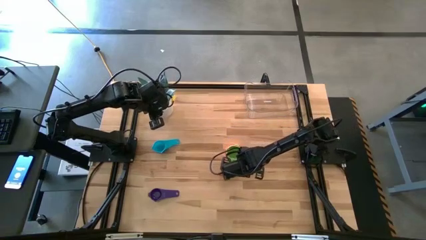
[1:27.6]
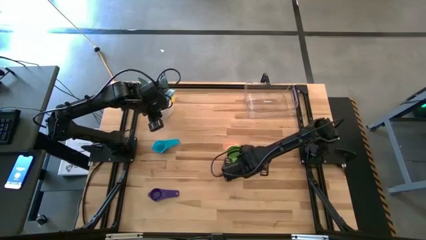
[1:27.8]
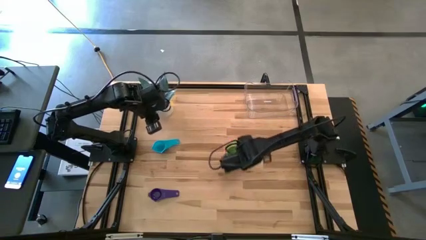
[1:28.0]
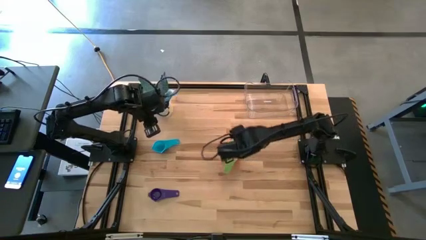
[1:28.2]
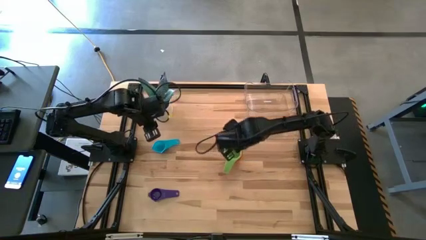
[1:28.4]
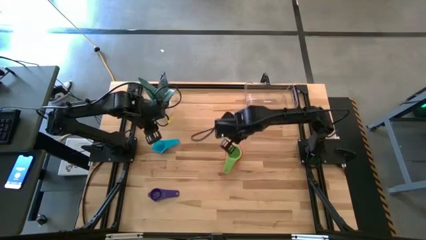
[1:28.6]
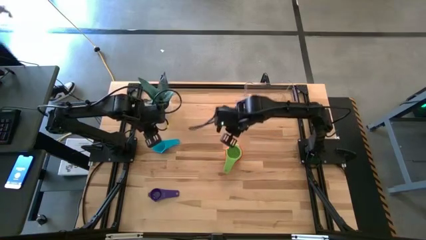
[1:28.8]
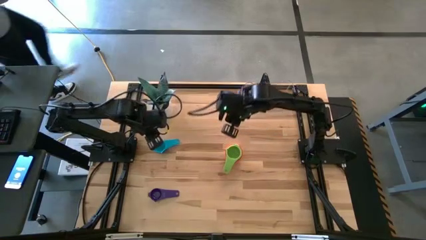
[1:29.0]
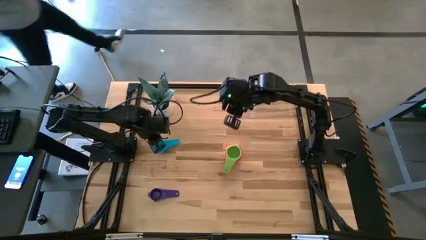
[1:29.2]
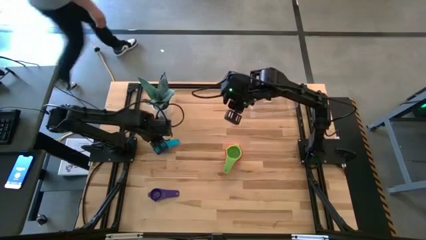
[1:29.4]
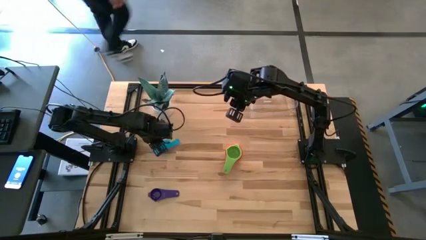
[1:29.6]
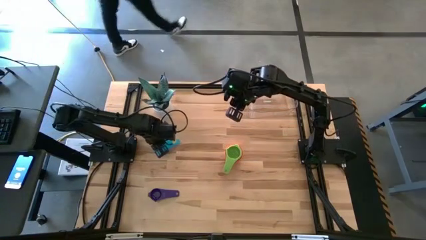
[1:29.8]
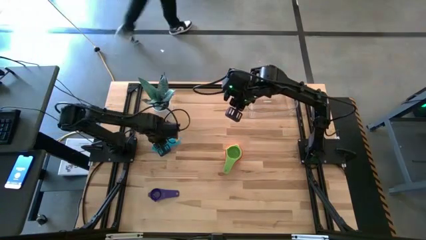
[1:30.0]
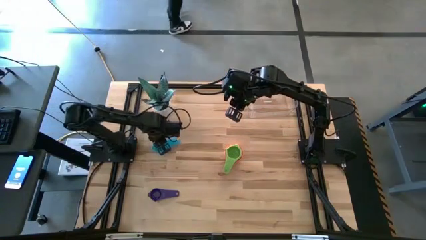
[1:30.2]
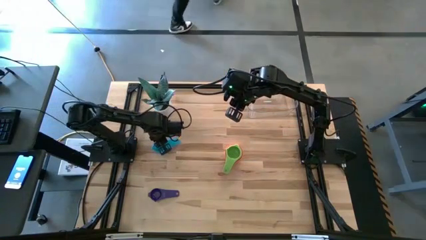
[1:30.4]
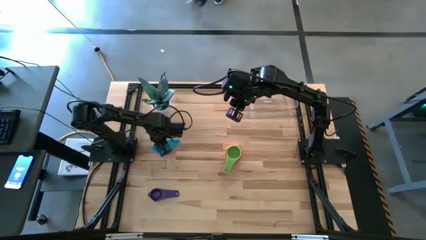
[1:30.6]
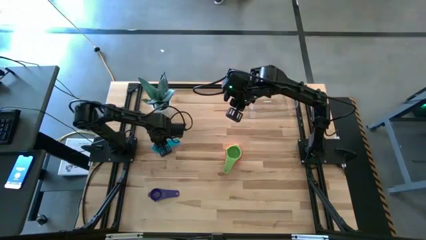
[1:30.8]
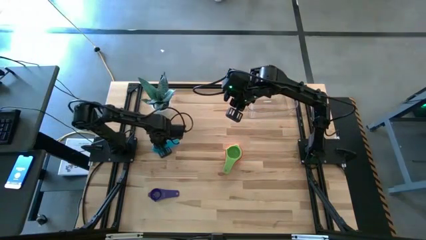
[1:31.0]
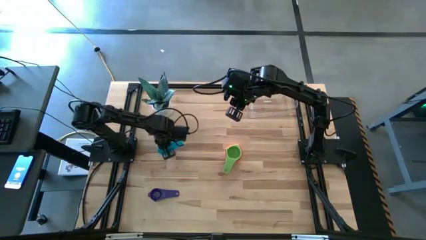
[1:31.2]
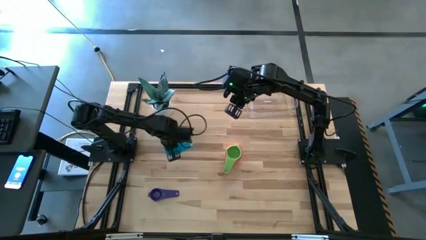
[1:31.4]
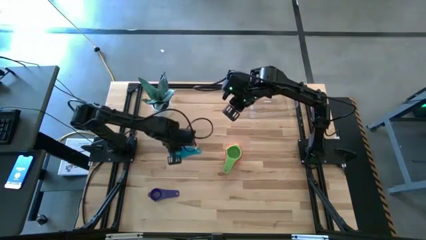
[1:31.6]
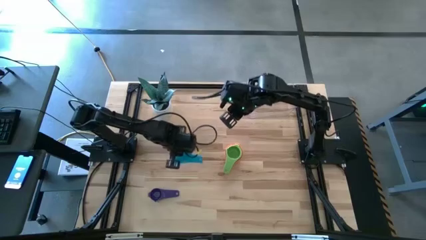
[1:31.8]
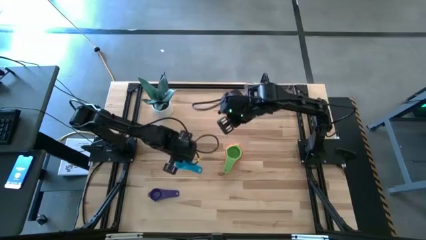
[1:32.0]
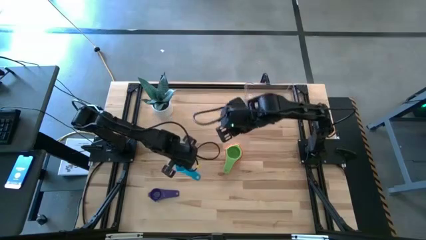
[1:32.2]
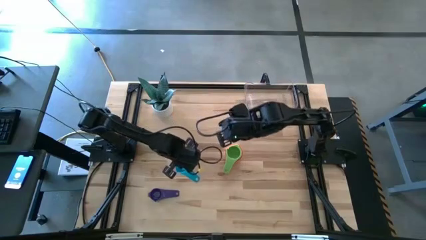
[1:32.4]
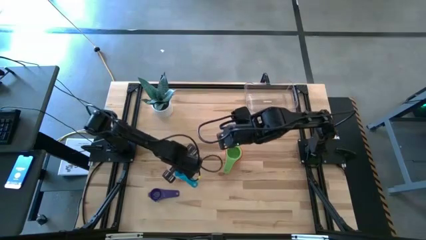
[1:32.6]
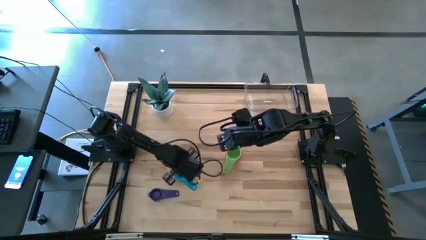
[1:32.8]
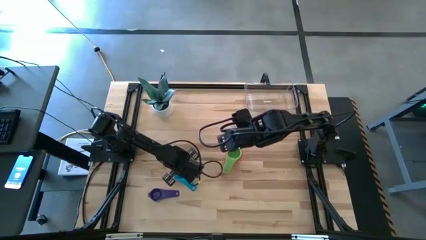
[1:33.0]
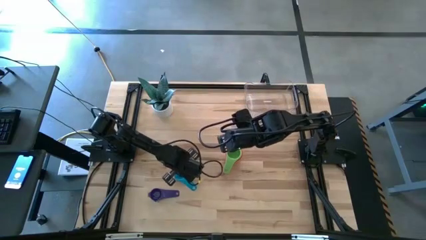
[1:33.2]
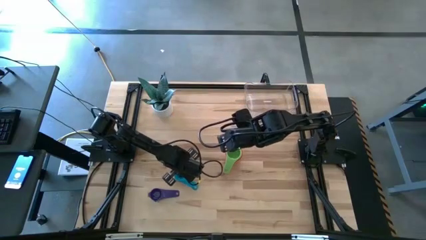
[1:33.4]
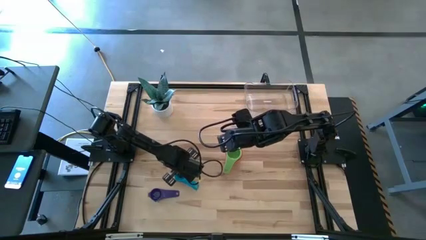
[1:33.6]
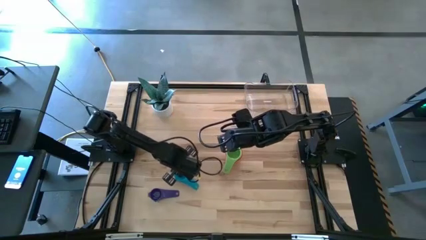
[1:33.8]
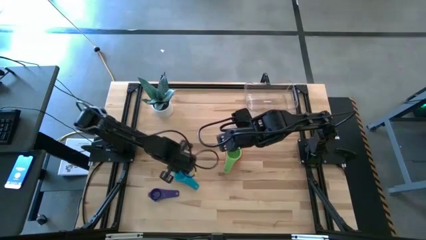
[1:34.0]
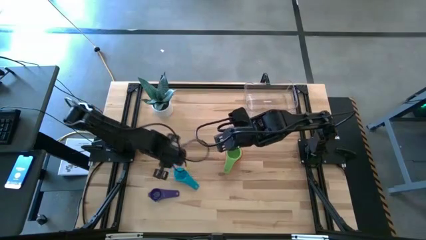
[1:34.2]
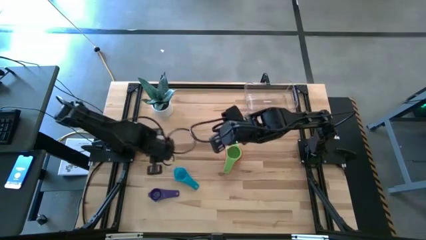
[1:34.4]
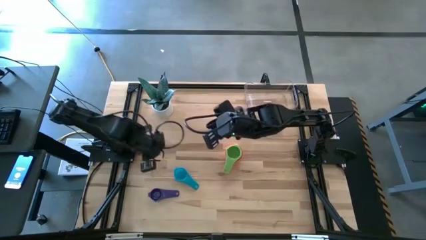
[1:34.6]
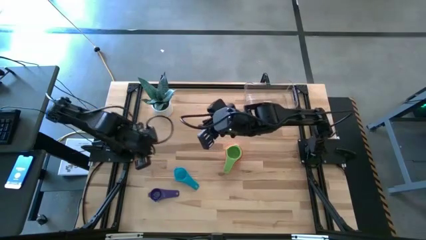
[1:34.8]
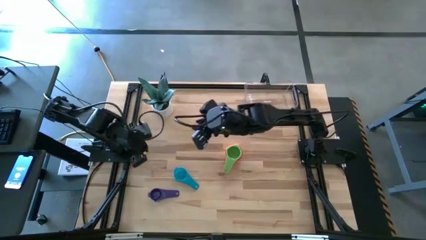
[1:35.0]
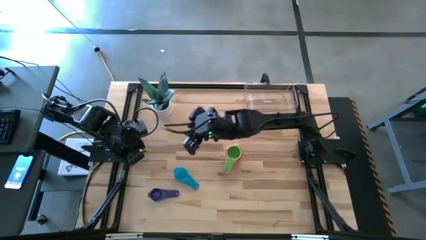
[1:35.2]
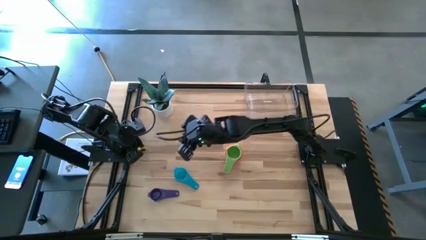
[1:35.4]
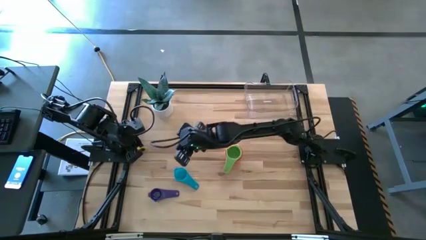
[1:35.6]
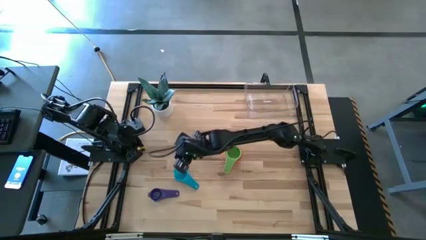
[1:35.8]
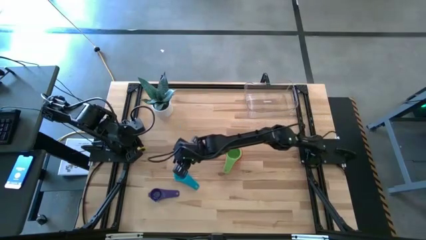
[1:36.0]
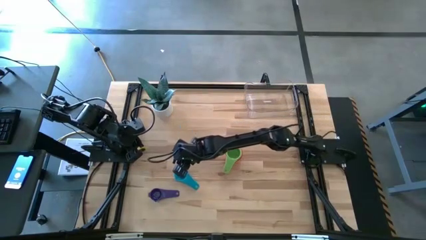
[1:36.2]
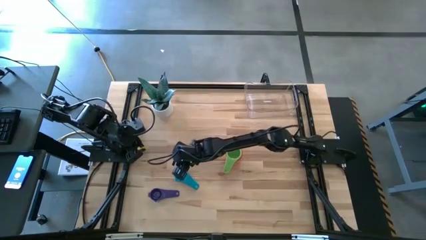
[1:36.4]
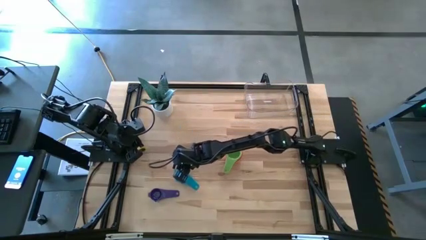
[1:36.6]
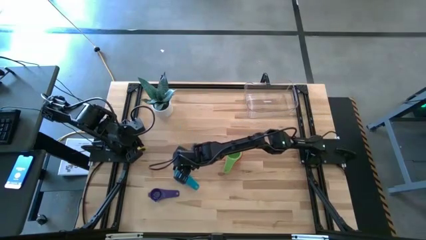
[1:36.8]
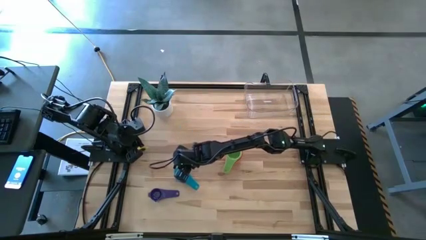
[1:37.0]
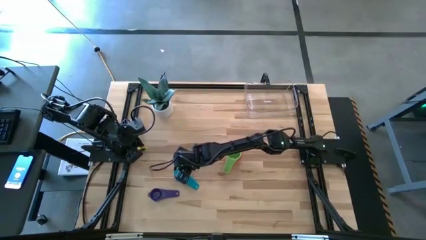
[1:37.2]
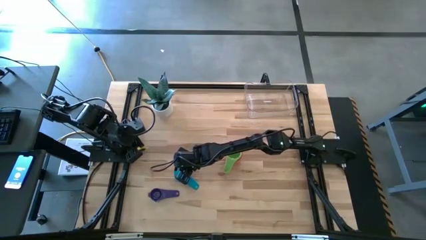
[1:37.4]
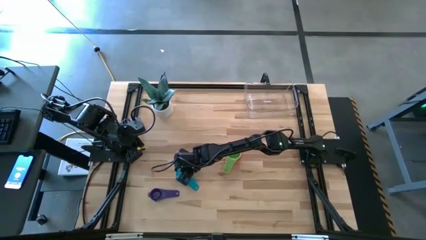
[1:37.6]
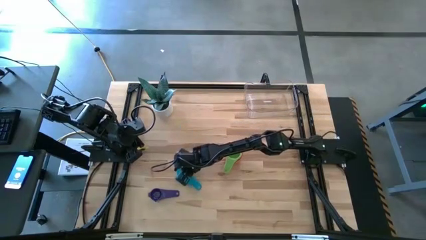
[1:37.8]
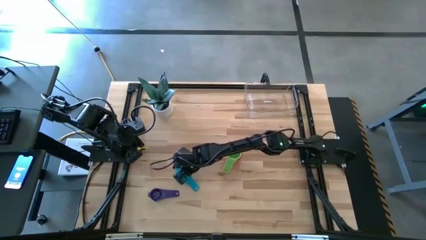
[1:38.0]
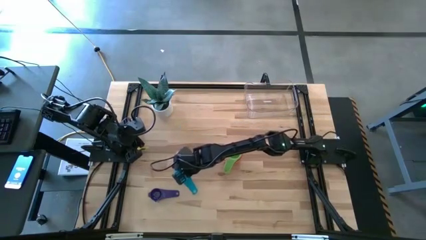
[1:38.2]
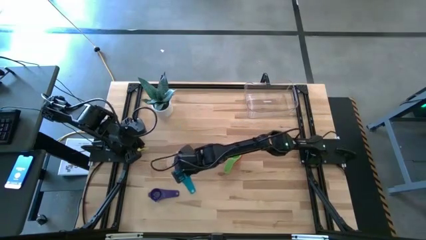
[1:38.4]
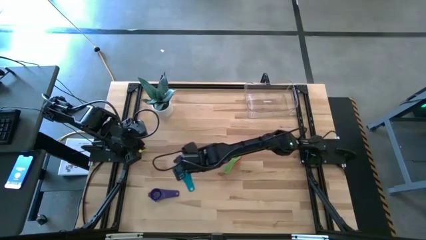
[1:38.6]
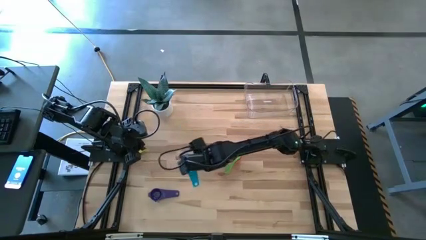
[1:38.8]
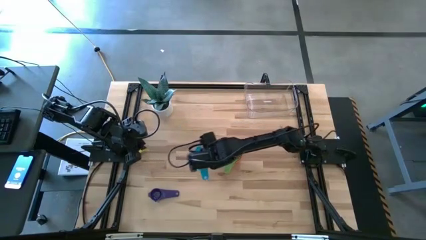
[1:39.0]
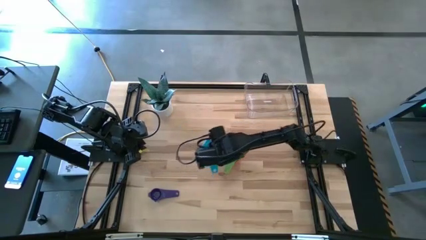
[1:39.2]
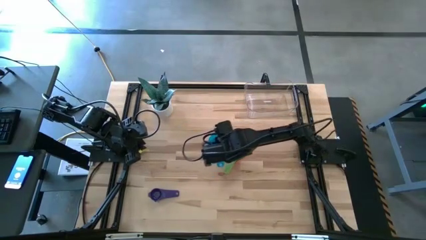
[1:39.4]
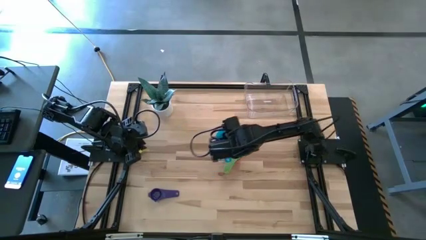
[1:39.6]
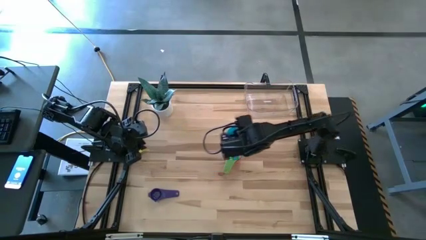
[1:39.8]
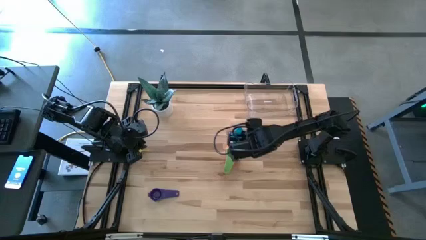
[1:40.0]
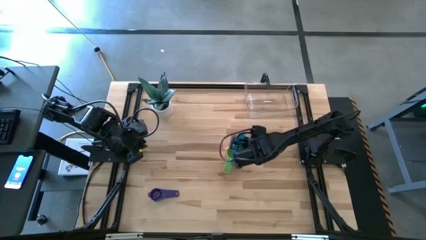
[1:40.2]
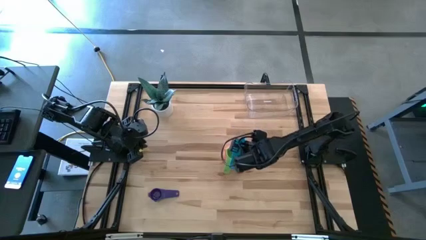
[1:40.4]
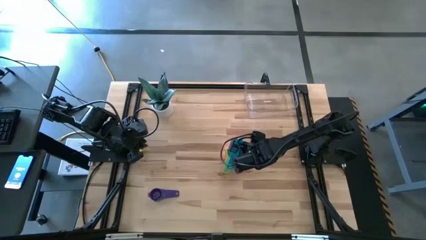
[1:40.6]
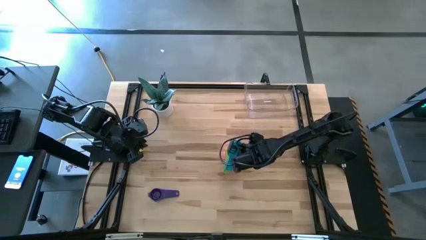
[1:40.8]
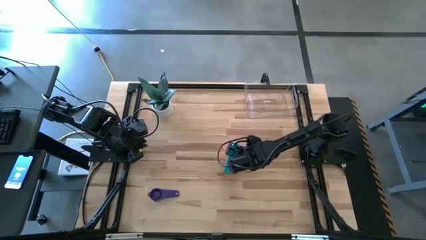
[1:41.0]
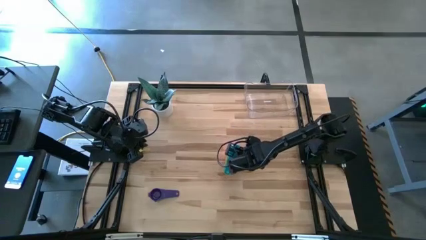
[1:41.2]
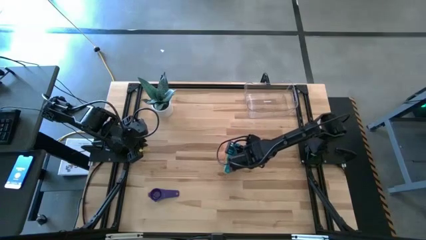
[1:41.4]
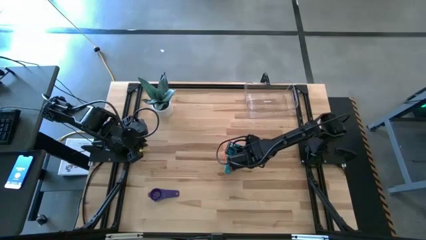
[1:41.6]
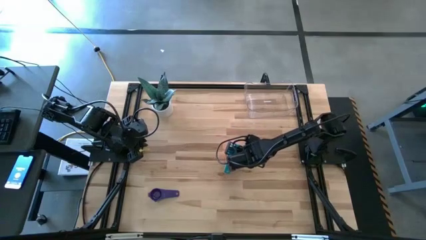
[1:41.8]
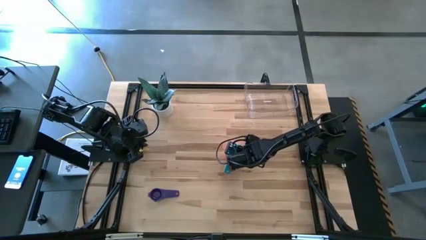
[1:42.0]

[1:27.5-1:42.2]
Task: Nest measuring cups in basket
Stack the light blue measuring cup on top of the green measuring cup

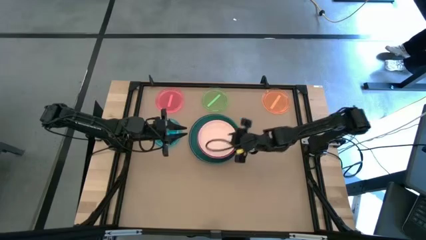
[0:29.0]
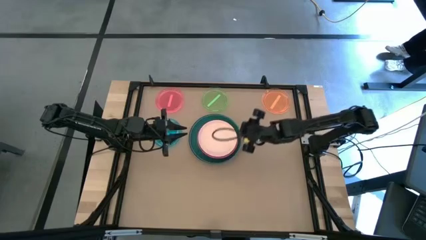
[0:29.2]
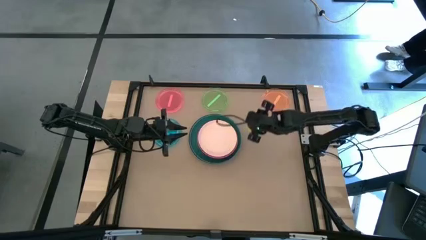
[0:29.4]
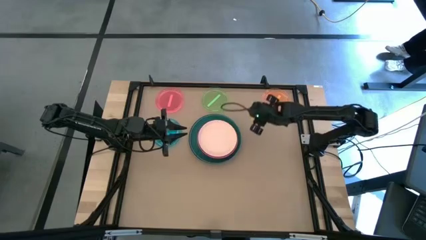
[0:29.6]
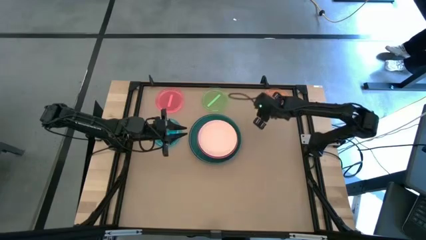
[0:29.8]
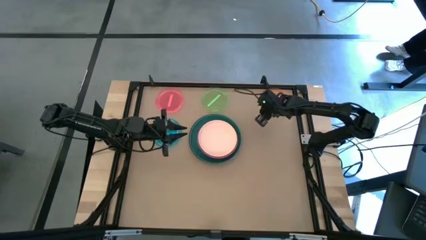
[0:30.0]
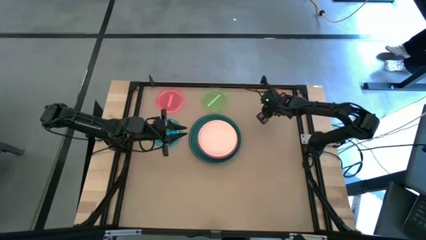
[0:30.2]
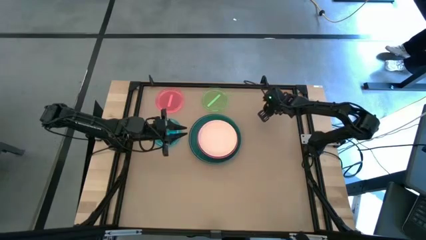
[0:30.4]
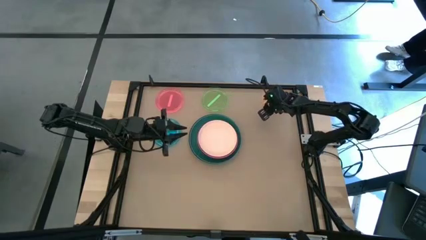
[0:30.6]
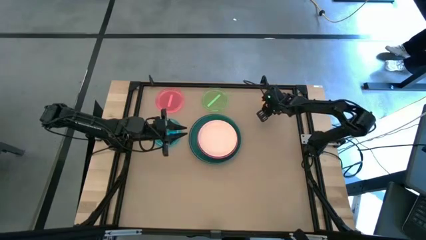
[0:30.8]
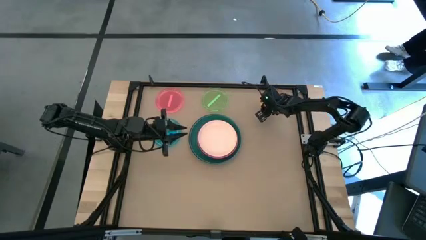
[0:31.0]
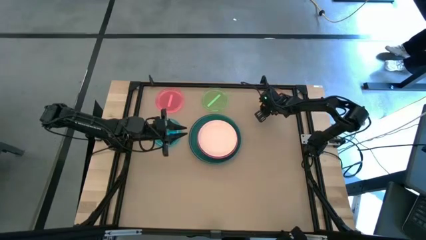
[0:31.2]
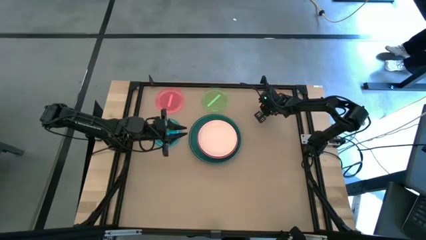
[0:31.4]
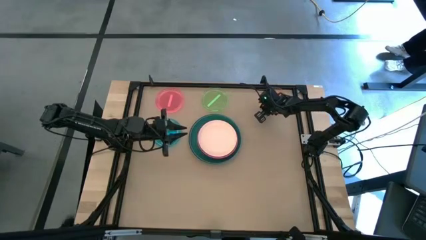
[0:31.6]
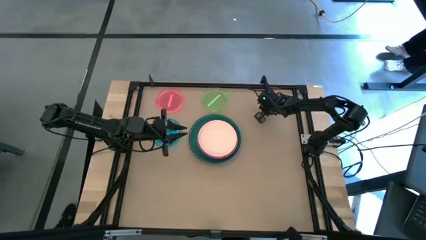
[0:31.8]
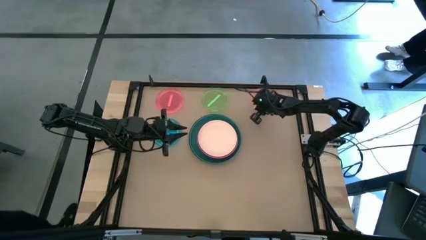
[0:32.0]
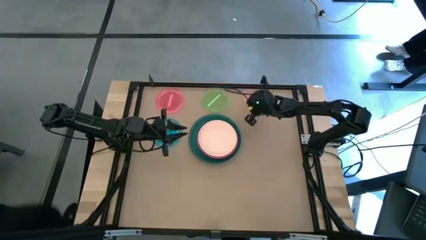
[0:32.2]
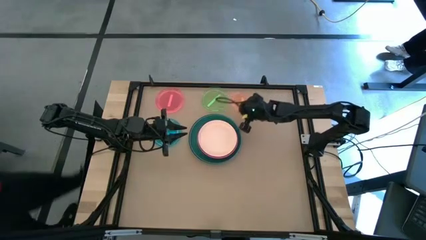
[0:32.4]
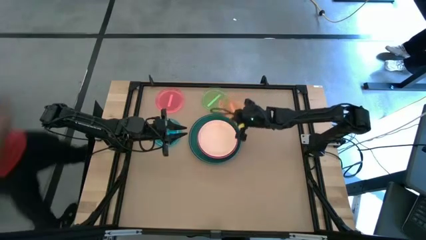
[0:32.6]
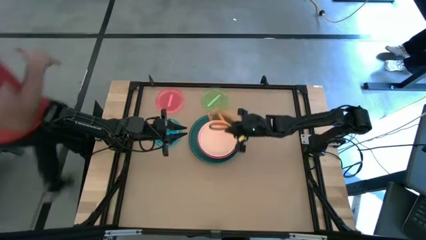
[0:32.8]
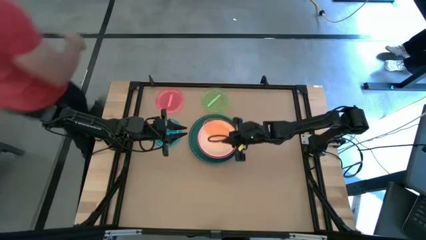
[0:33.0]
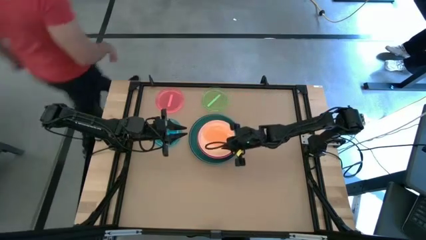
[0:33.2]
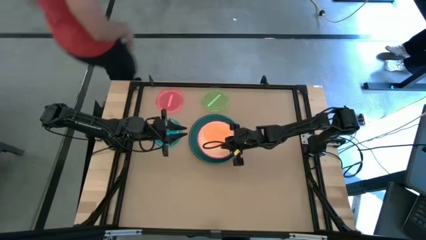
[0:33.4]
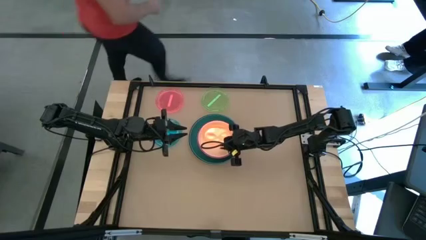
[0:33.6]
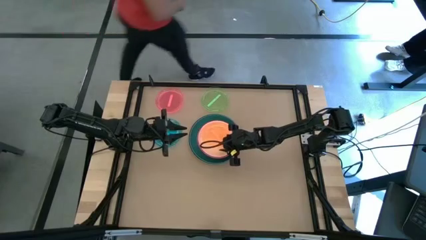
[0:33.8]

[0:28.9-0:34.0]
Task: Stack plastic plates
Stack the transparent orange plate on top of the light orange plate
